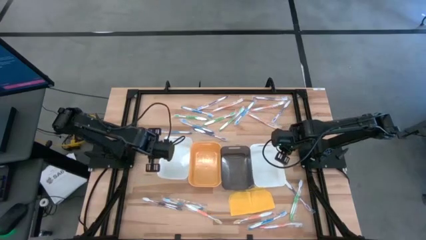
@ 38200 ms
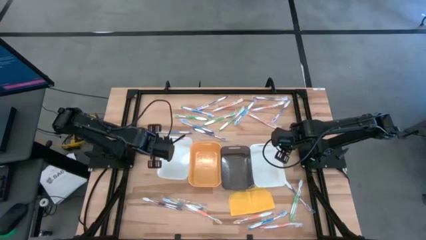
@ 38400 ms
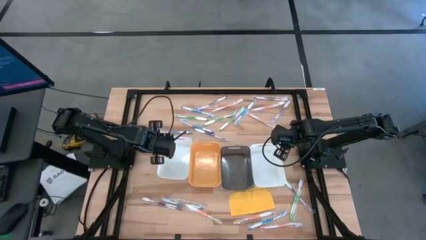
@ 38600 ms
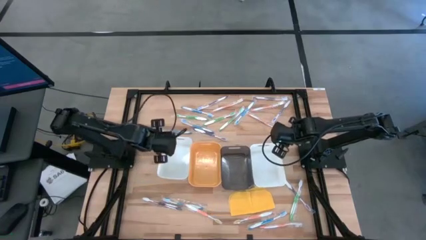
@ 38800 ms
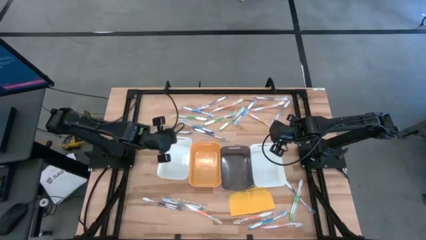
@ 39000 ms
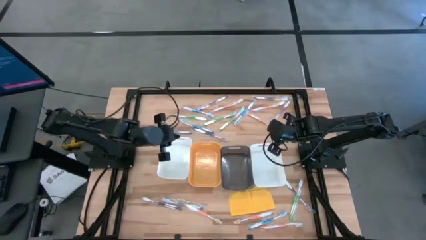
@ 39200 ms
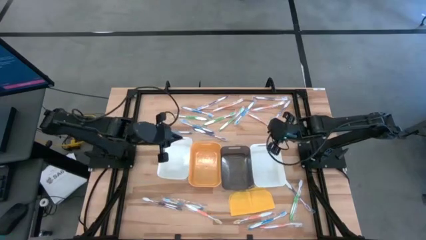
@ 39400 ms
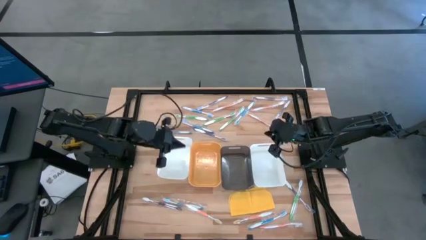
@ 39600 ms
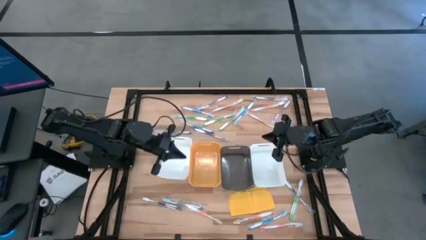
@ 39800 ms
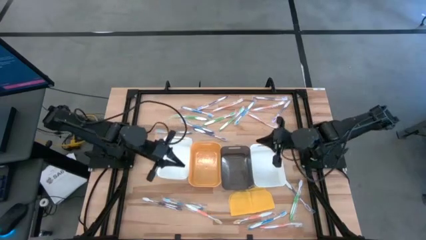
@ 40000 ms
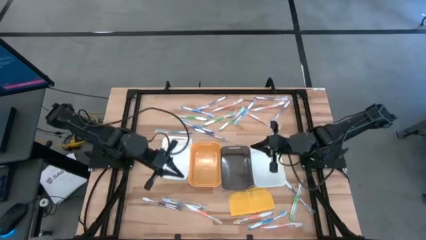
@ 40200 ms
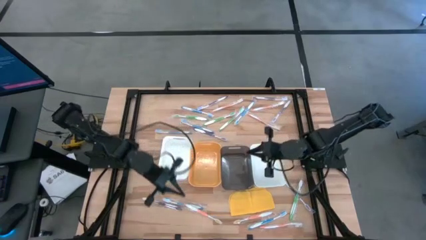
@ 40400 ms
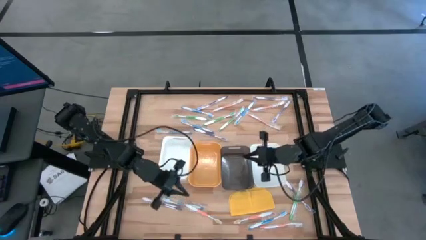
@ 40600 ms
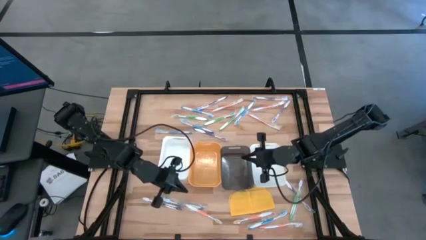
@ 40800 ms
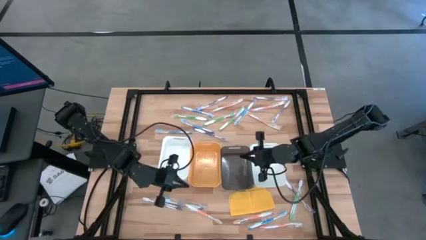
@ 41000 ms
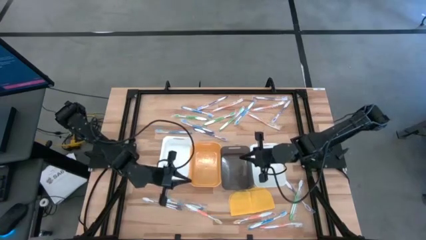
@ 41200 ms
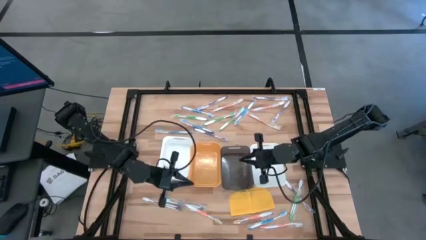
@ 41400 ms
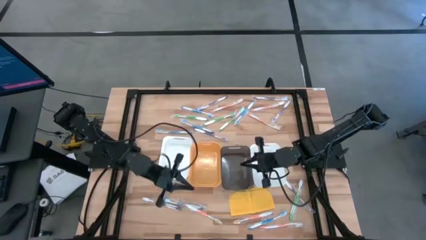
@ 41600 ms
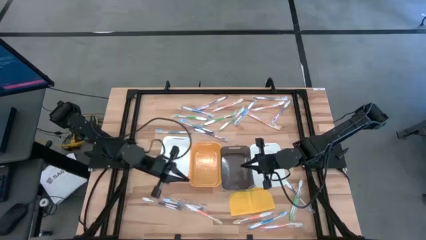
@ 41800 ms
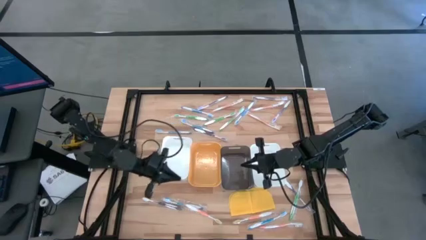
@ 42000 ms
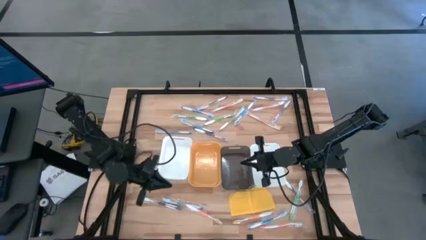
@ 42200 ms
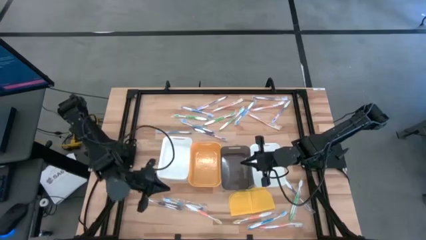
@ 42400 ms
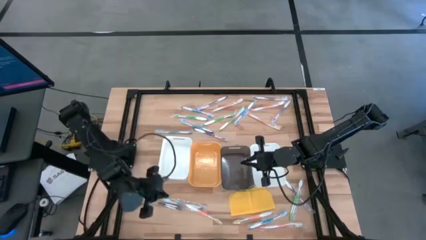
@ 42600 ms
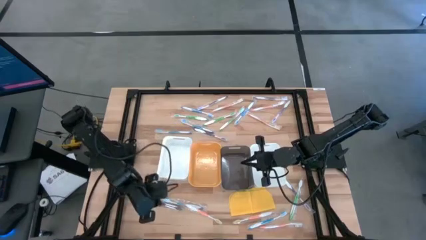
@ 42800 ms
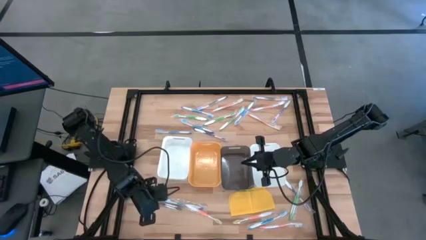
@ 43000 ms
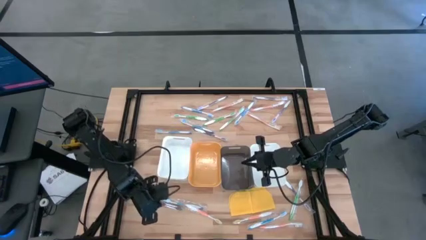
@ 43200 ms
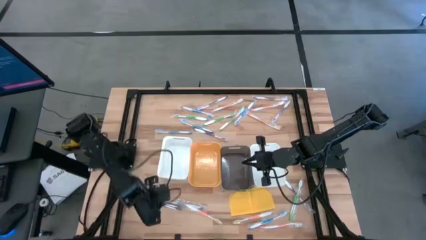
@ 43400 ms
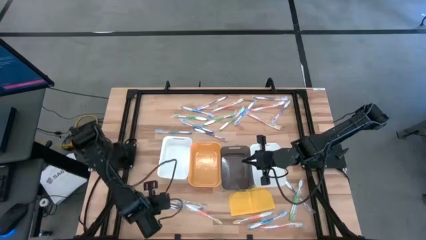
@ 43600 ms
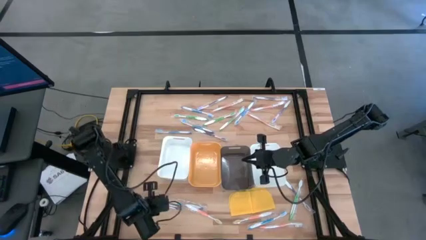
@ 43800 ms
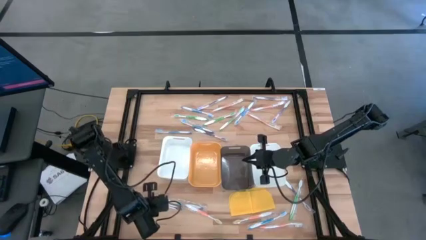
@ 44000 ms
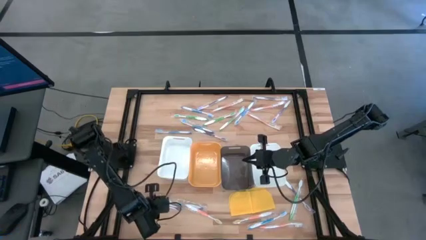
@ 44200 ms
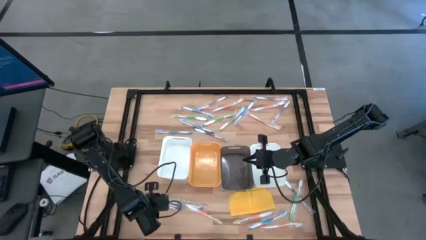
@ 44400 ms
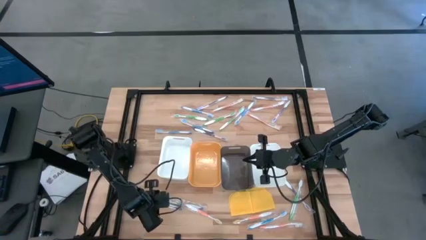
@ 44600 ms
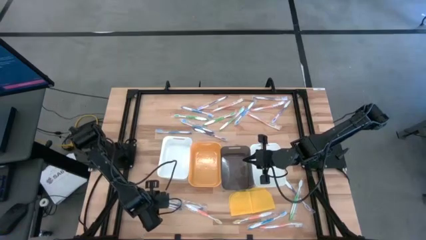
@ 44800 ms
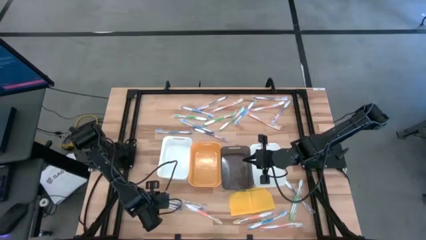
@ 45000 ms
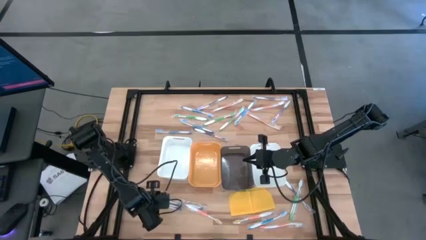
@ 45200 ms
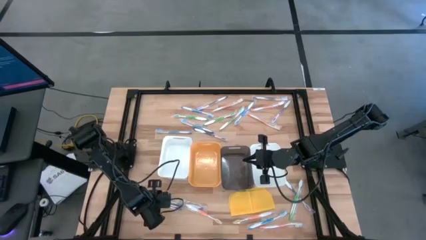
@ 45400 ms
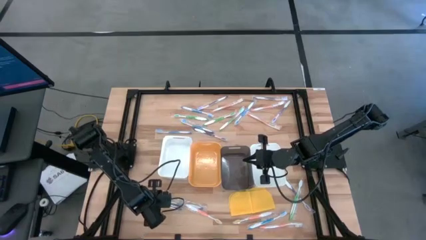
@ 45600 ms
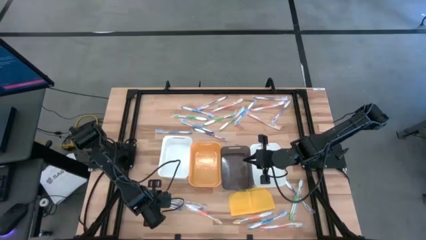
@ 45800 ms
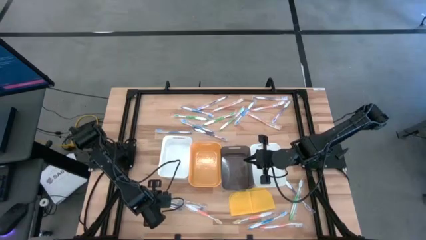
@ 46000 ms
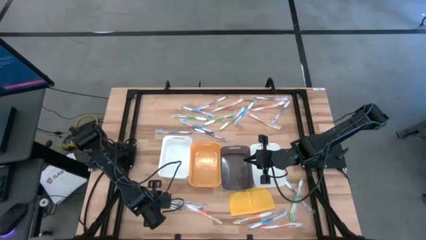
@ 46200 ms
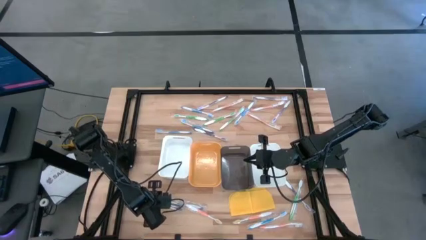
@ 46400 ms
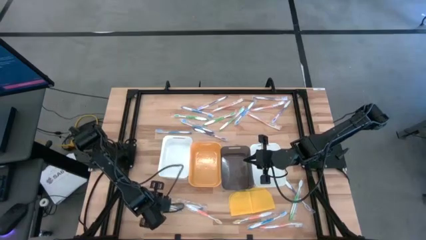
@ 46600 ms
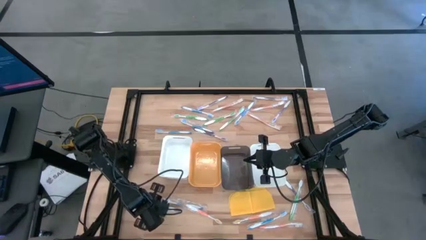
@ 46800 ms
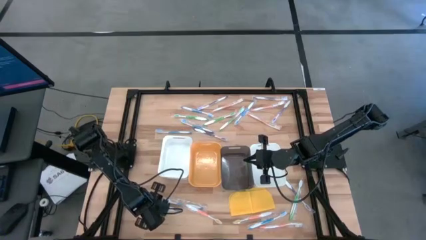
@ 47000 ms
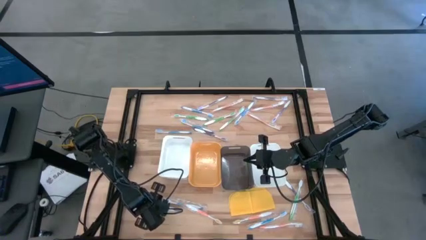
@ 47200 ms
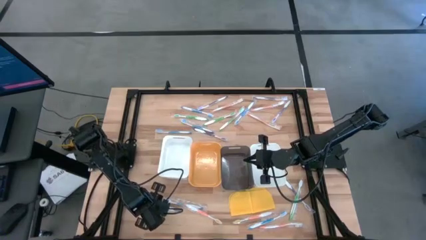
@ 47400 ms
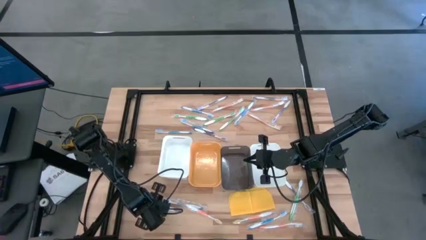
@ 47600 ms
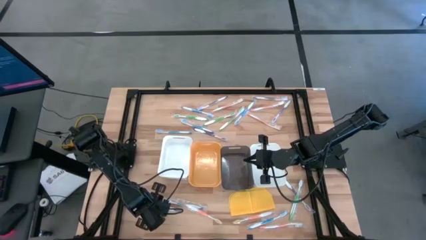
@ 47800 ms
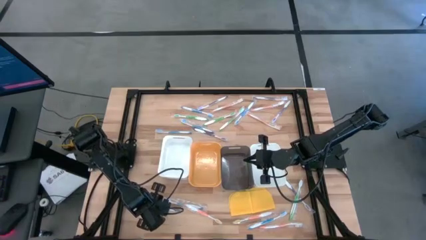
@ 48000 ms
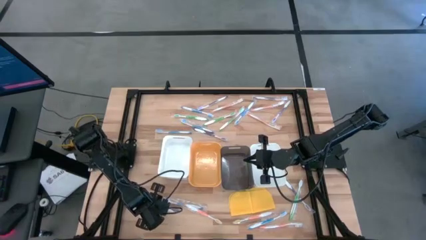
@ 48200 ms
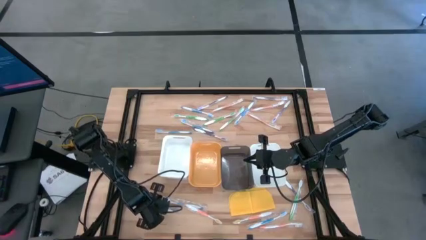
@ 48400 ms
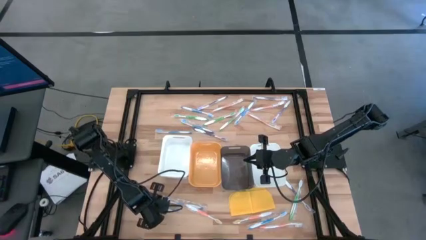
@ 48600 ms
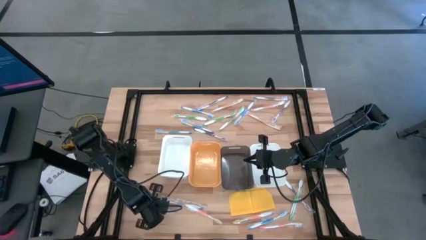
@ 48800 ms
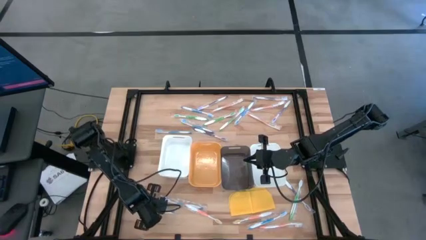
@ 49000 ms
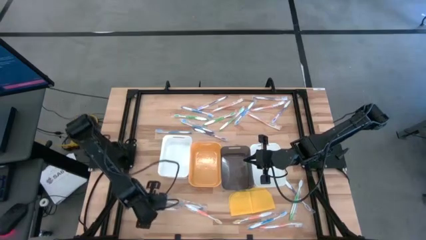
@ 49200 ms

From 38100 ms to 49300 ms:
Task: Pick & Place Toothbrushes
Put the purple toothbrush into the right white bin
